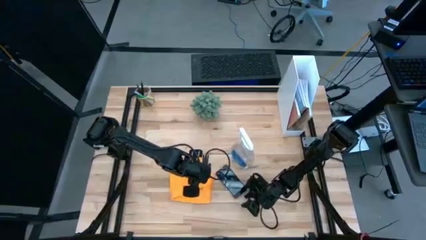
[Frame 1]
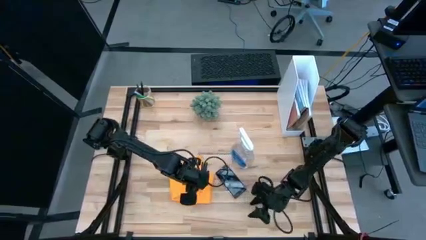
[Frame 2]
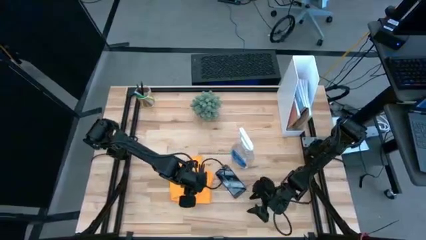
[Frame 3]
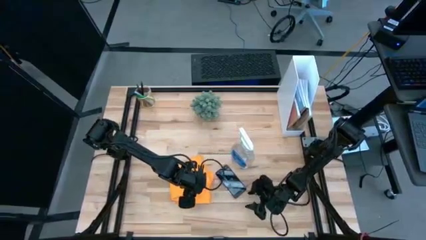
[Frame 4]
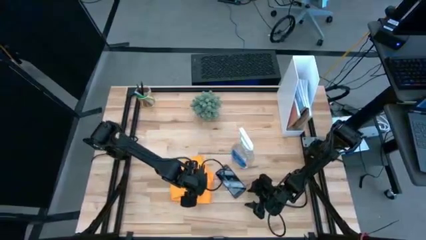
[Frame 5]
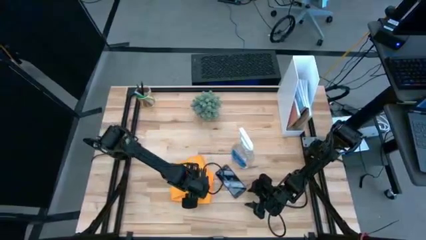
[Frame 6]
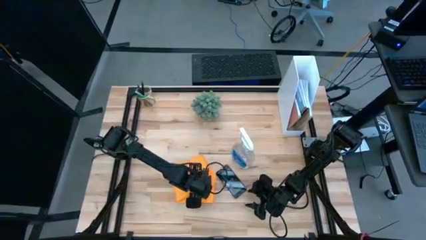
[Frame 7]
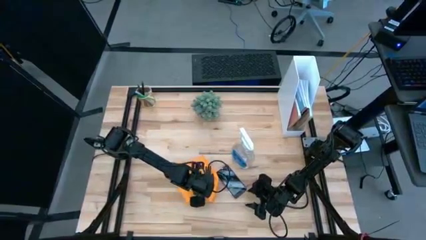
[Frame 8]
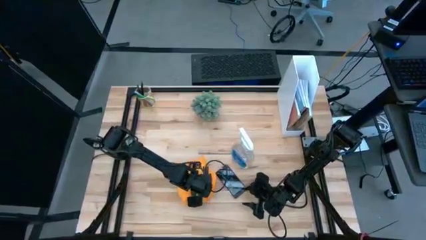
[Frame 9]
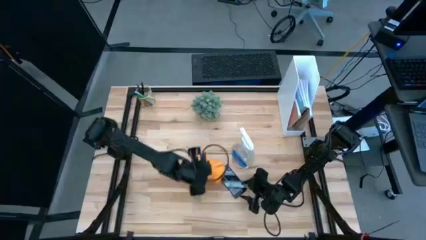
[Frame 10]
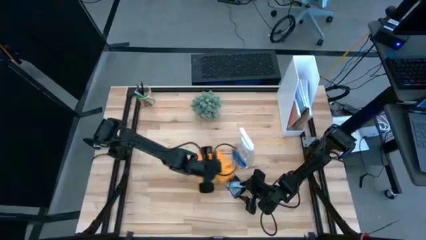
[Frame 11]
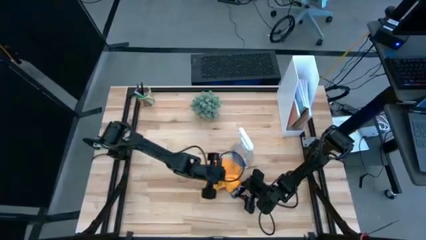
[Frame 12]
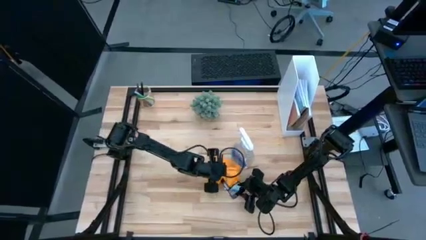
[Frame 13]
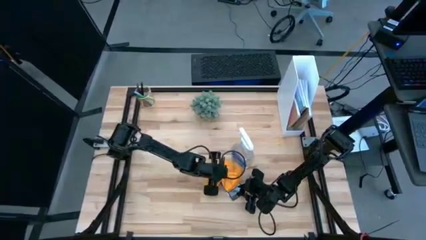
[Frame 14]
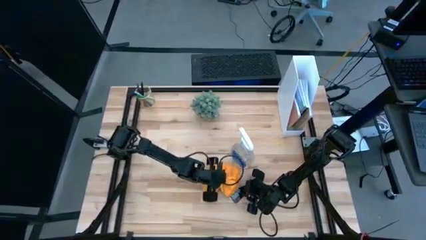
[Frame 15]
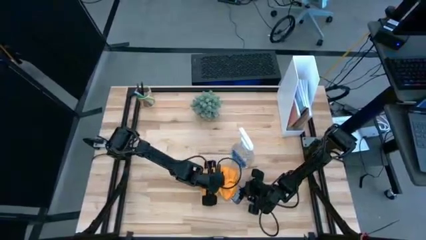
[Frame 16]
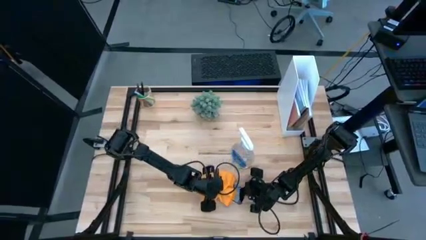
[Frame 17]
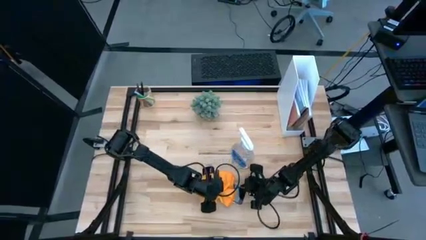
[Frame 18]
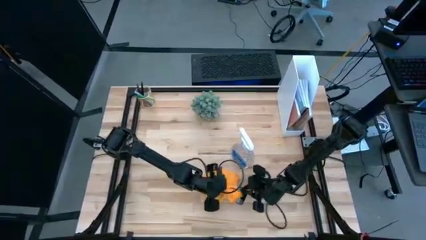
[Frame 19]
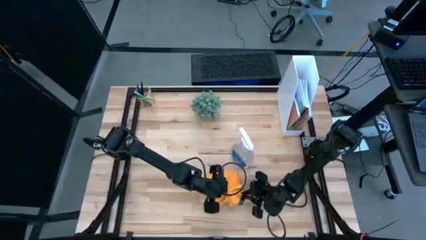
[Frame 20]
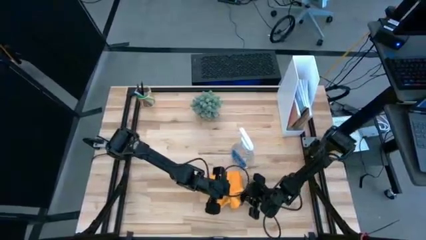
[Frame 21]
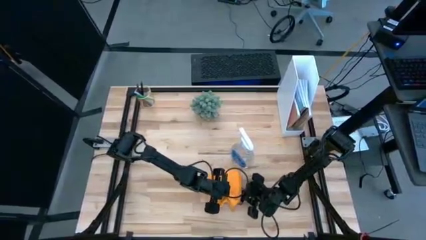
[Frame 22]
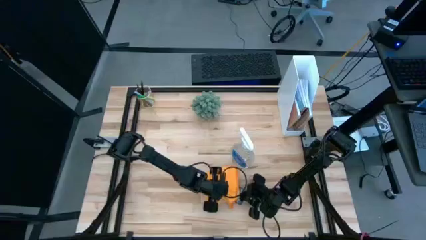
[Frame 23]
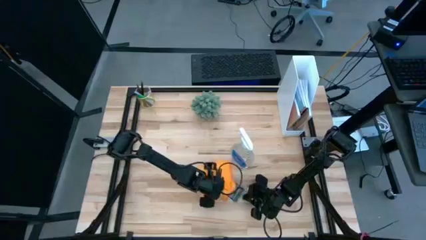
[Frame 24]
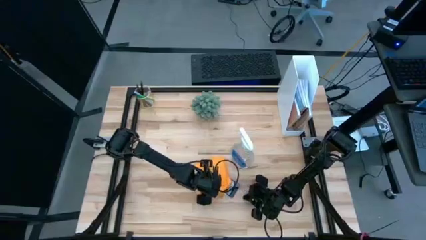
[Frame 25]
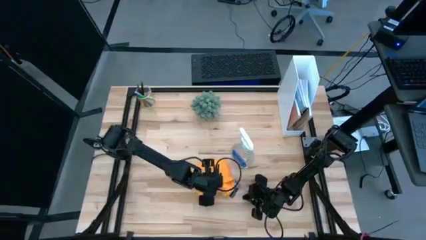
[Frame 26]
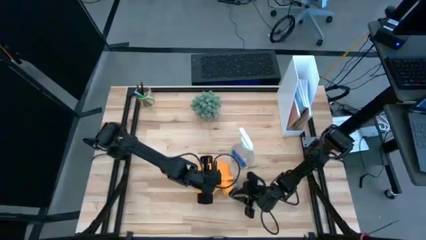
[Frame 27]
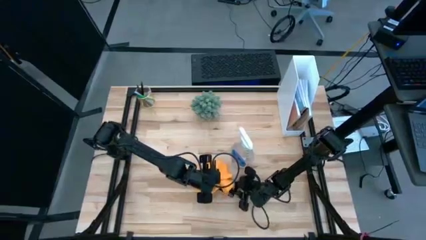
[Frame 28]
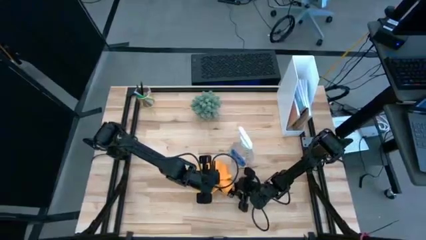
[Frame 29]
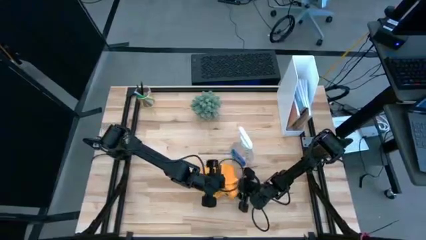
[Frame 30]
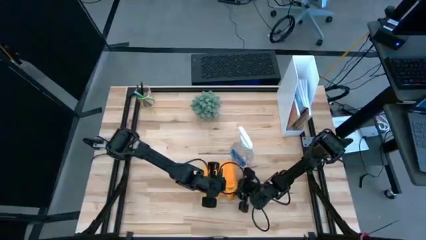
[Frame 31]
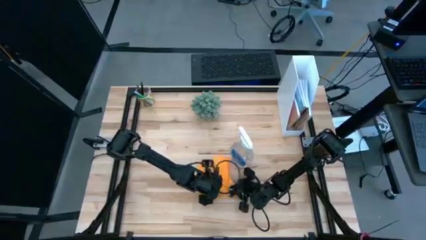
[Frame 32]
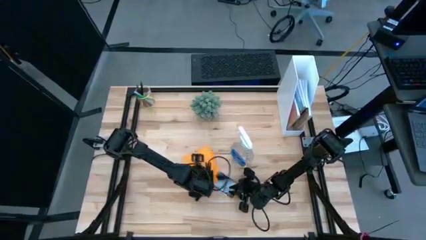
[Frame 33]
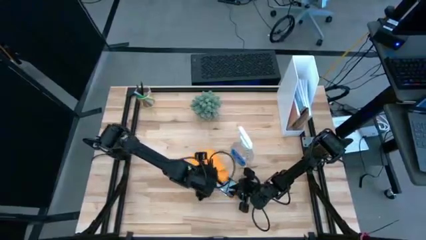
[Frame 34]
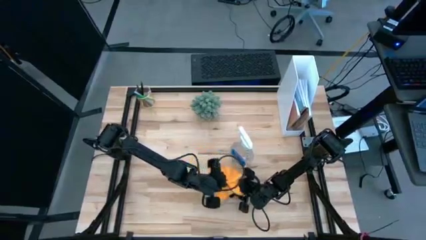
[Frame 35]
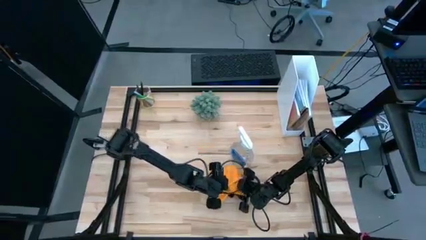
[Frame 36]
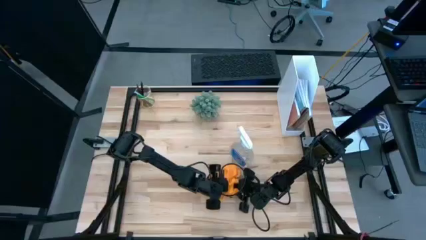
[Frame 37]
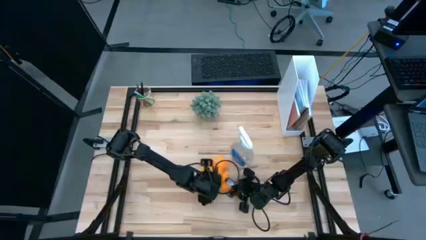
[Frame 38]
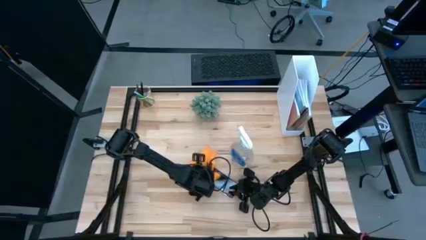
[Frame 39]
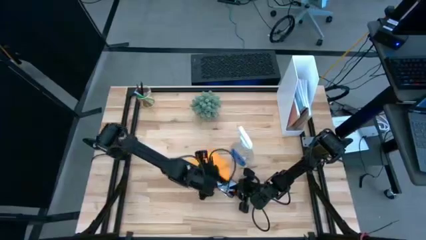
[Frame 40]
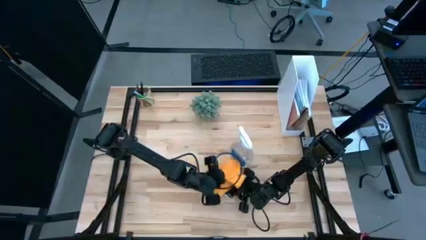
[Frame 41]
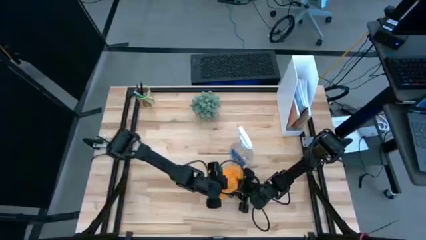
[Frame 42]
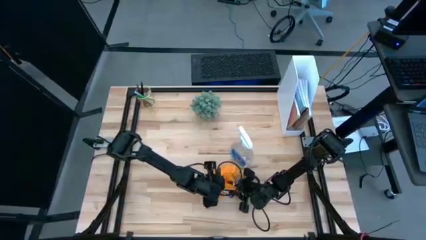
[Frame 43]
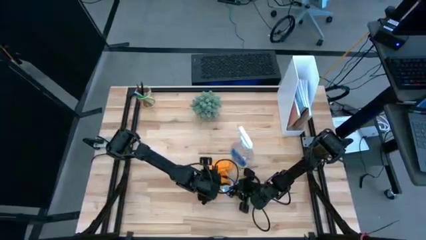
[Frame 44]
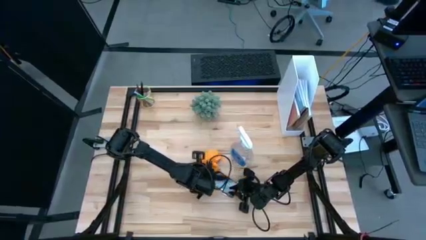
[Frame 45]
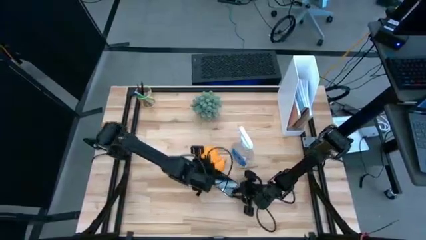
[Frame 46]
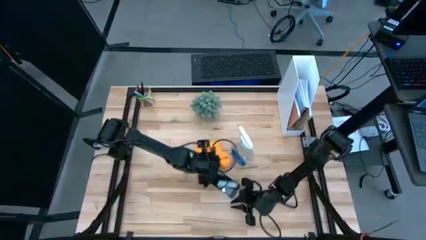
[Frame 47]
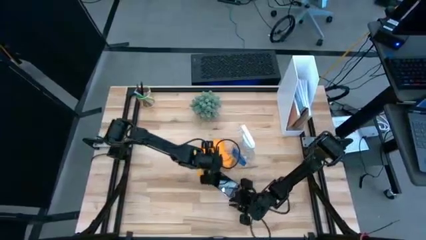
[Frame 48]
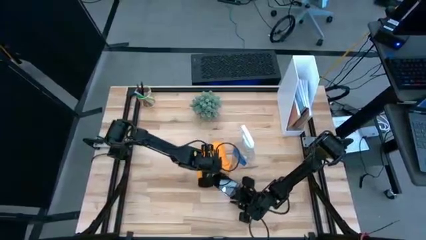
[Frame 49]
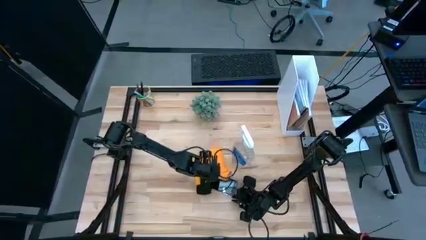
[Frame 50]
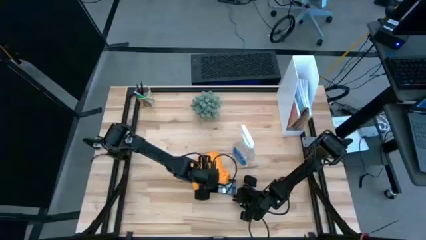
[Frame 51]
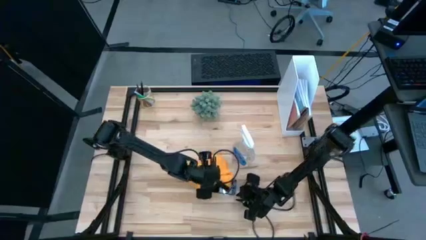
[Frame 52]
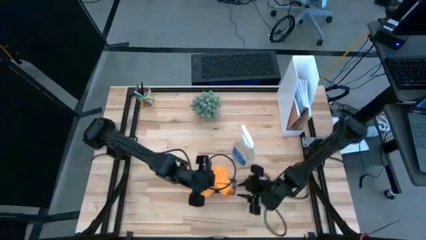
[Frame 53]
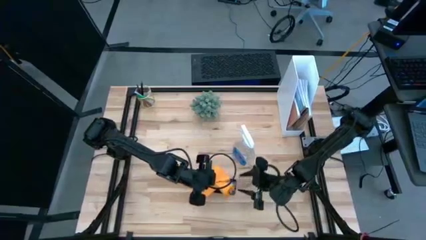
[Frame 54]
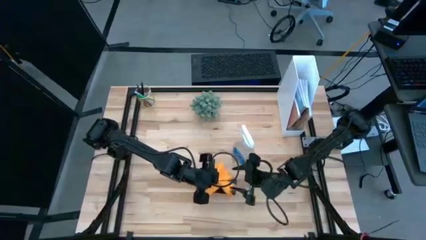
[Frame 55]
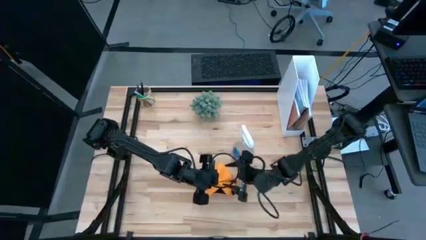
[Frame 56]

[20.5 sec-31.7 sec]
Task: Apply microfiber cloth
Wipe the pink cellphone with the orange microfiber cloth
